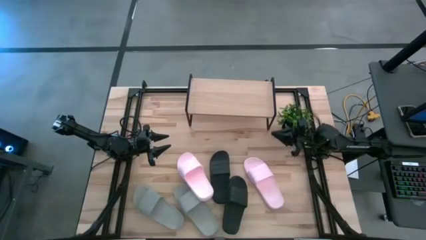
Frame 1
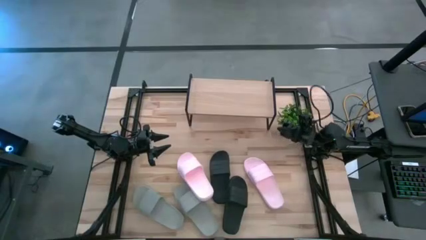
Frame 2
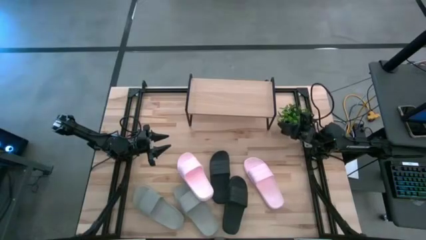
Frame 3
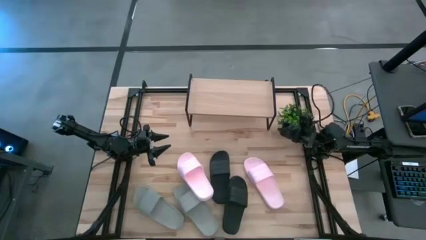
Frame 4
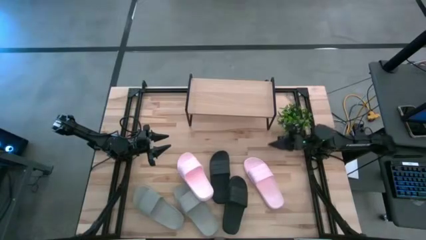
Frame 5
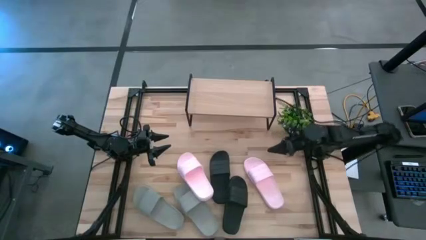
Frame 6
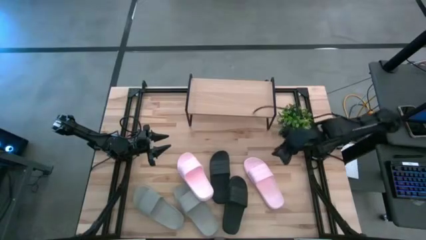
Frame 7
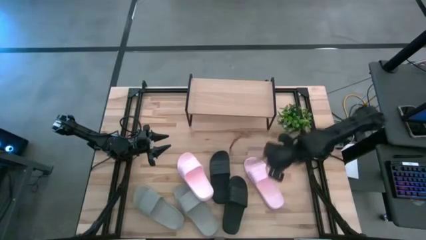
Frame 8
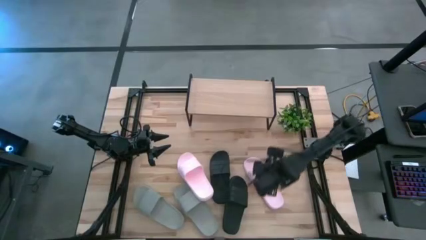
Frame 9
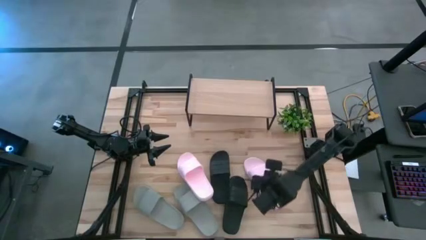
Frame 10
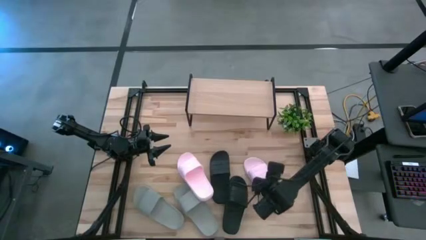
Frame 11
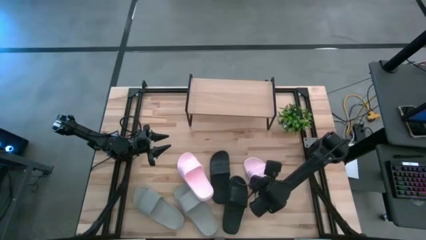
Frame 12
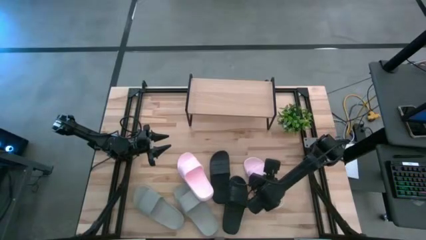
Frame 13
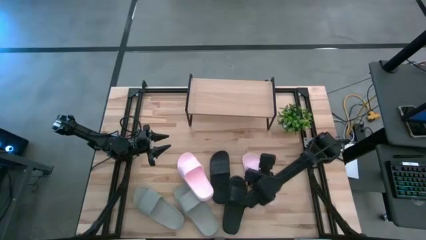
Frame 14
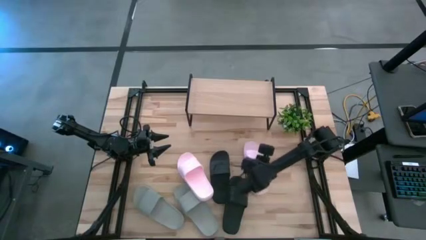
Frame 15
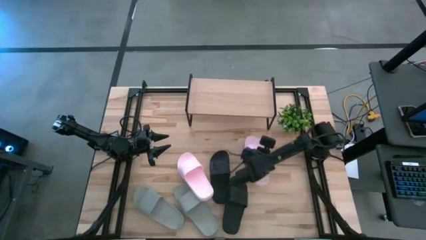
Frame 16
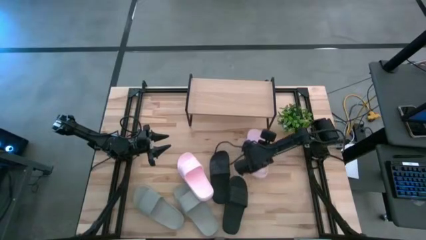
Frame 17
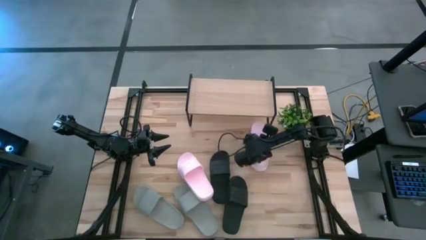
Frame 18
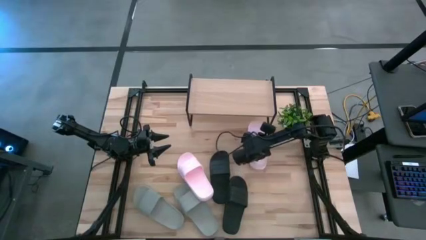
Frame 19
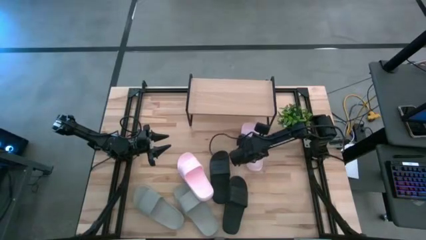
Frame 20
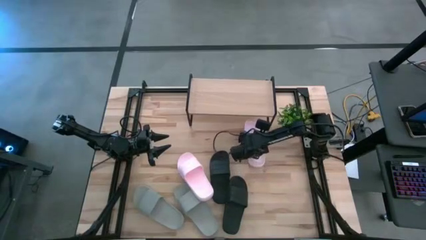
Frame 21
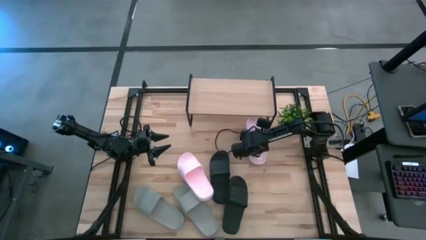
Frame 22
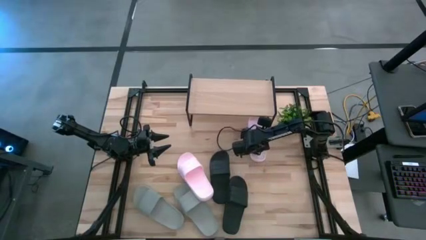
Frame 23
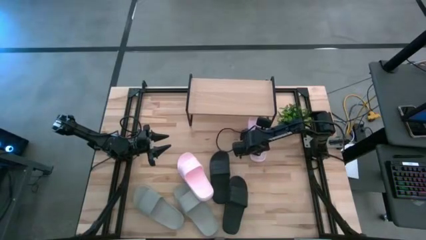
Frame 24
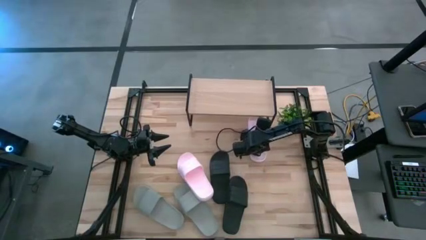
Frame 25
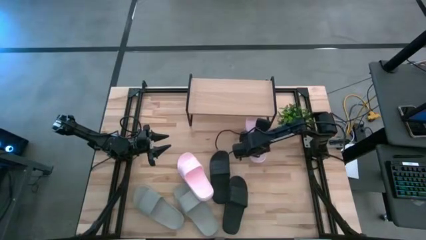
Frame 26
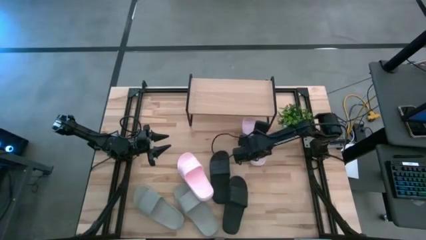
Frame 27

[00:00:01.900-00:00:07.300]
Task: Pick and place slides into the shelf
Put the right pink slipper under the shelf

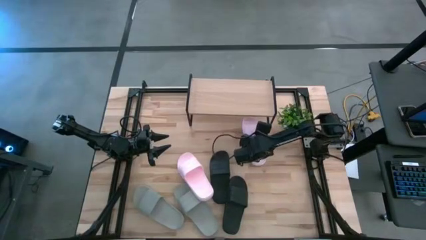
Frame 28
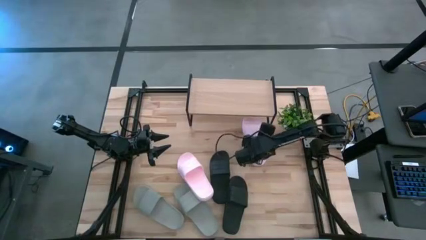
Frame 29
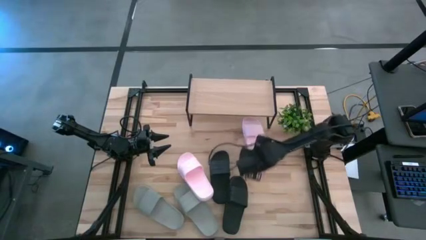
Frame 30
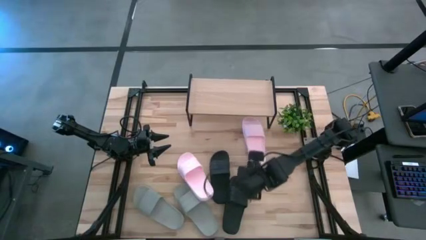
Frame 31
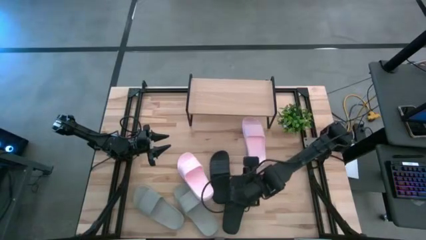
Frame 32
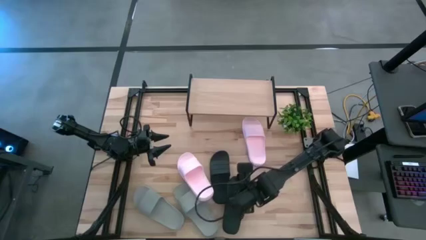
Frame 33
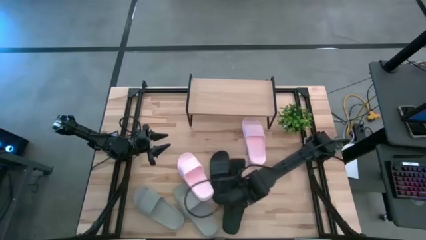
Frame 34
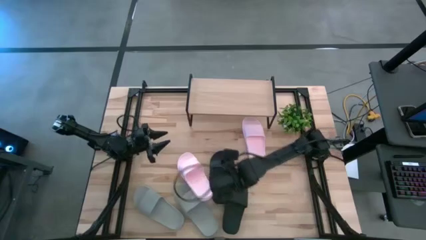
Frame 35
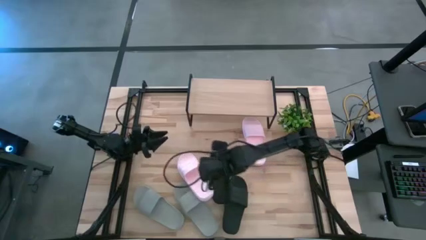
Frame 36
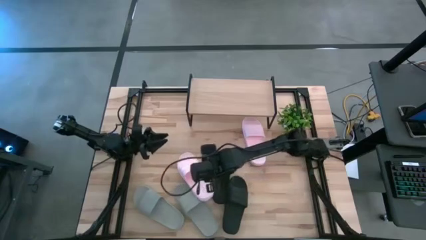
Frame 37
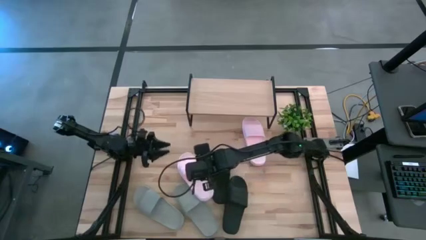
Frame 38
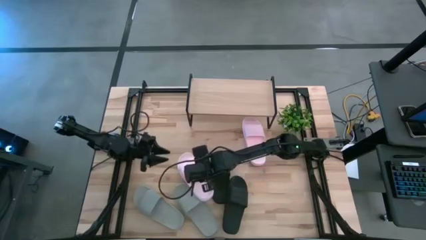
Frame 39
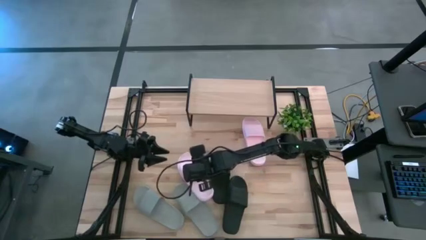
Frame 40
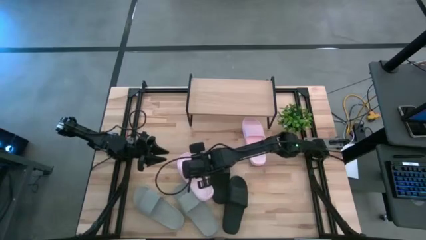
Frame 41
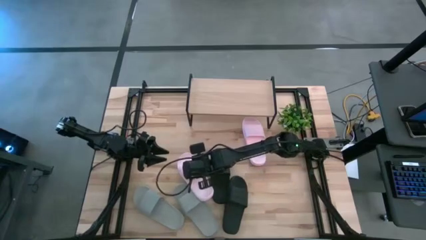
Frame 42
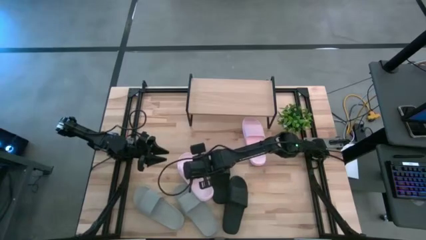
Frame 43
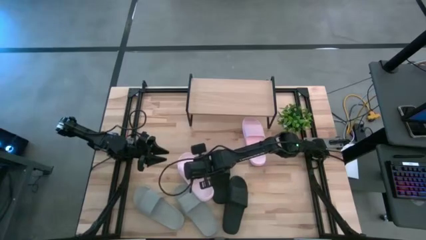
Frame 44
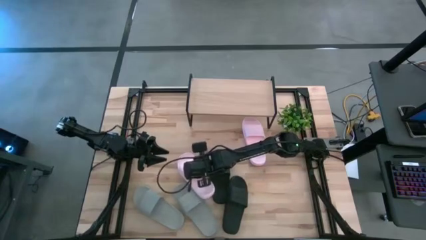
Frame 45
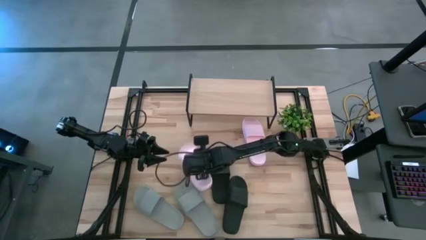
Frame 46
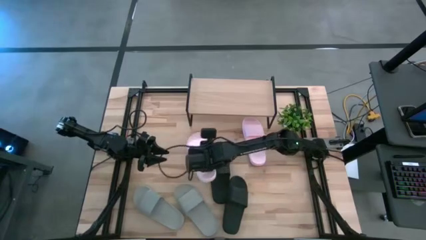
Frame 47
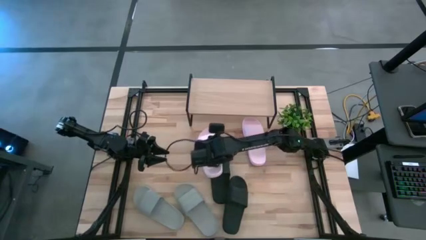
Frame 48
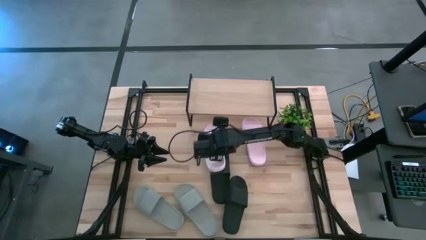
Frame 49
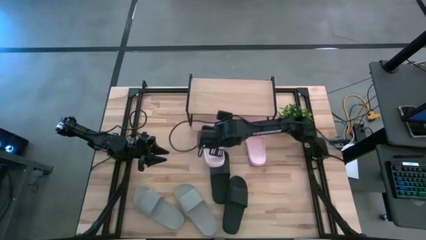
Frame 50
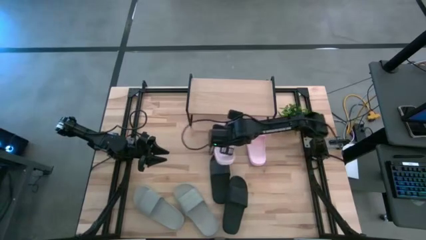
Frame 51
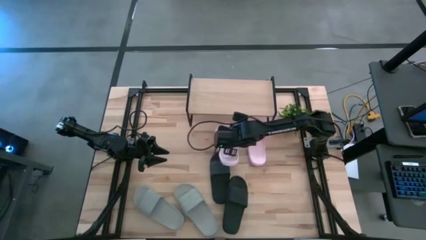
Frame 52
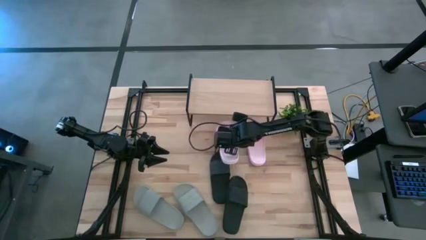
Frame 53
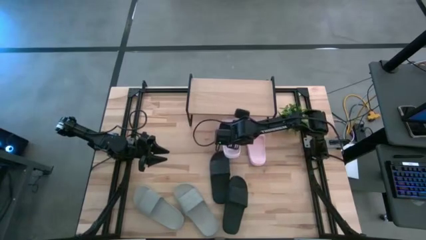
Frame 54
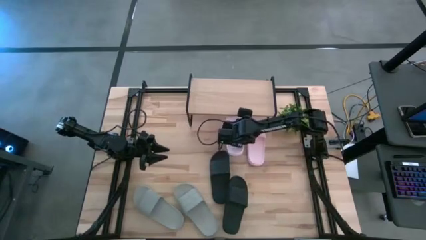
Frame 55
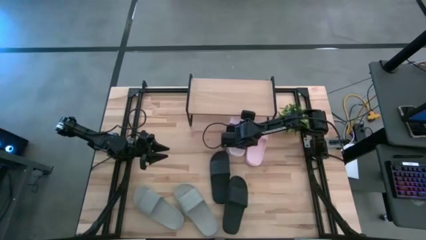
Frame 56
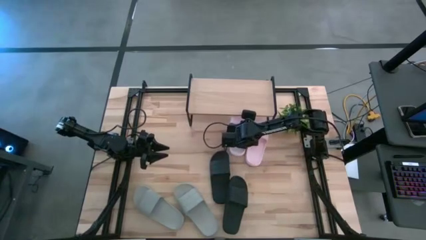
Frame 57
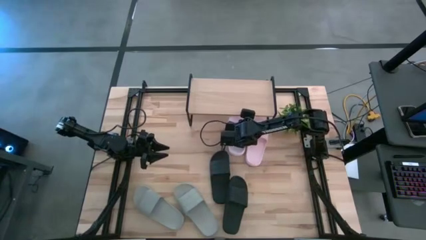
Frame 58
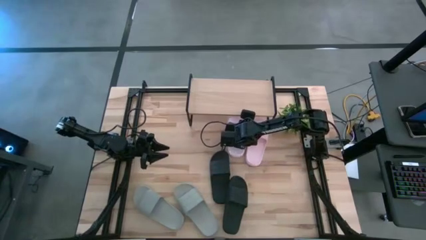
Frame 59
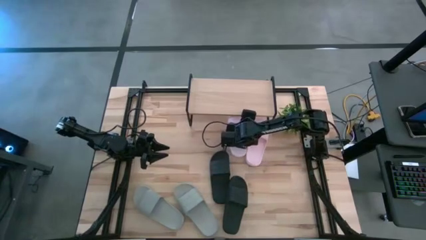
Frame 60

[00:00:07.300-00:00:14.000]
Put the pink slipper under the shelf

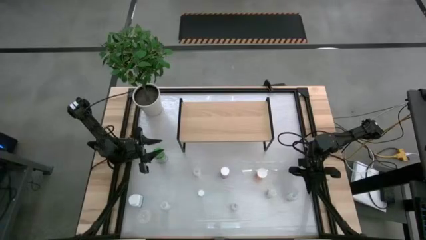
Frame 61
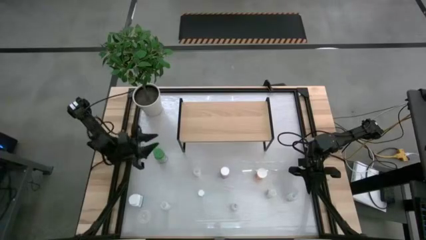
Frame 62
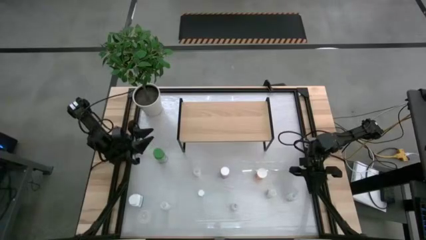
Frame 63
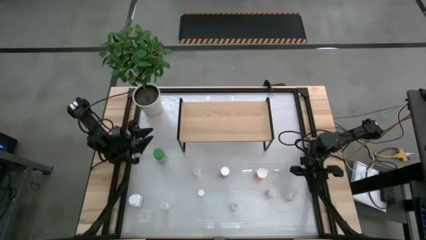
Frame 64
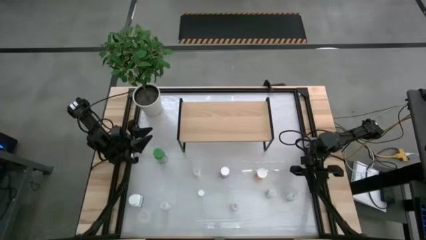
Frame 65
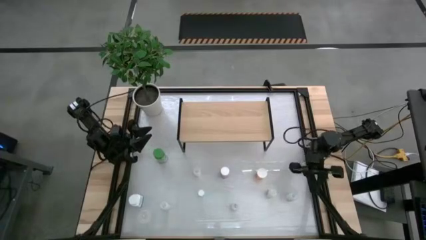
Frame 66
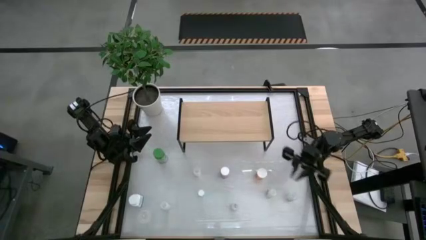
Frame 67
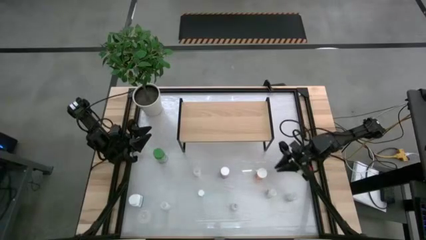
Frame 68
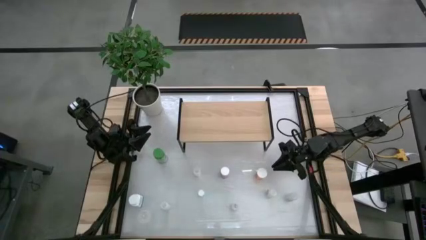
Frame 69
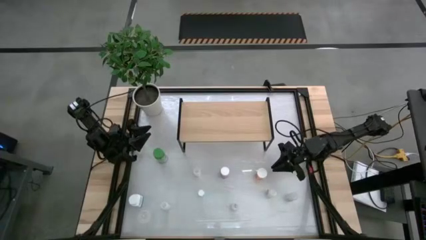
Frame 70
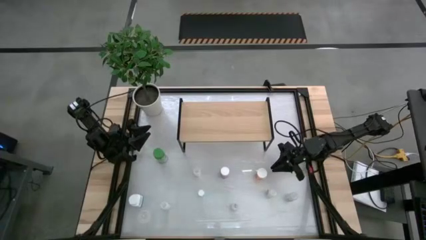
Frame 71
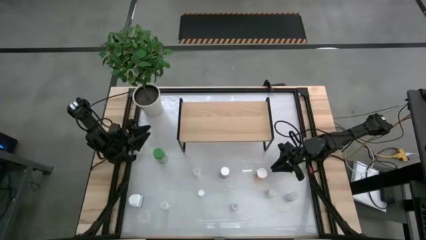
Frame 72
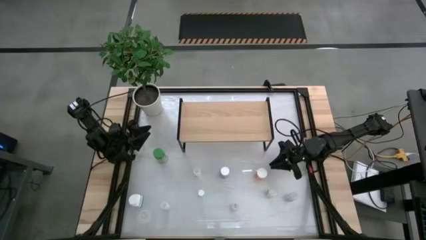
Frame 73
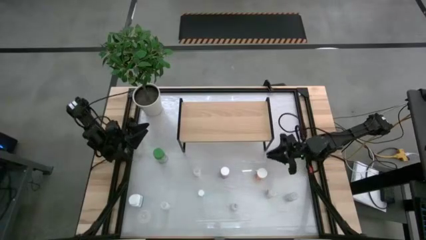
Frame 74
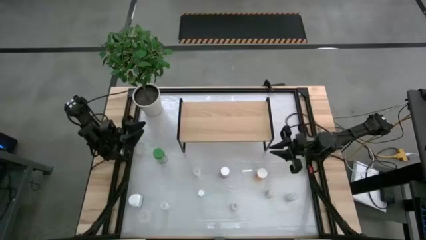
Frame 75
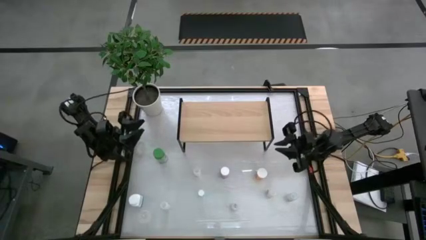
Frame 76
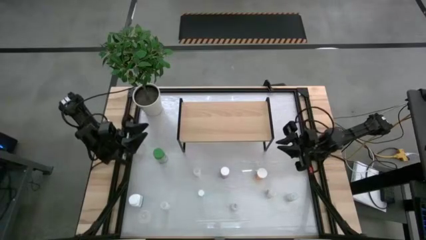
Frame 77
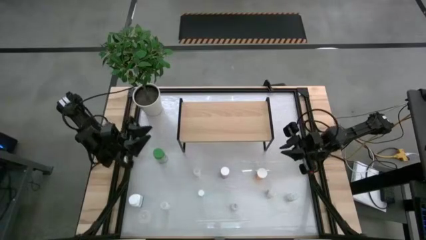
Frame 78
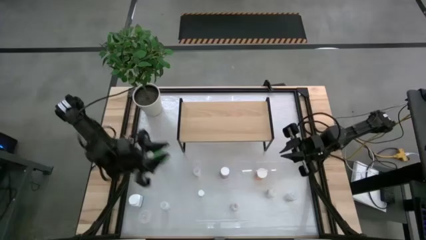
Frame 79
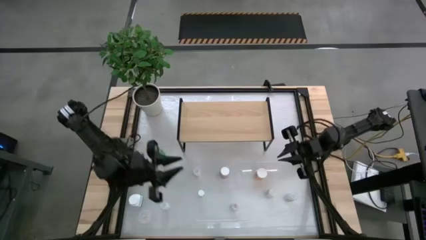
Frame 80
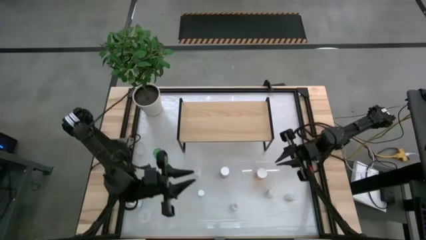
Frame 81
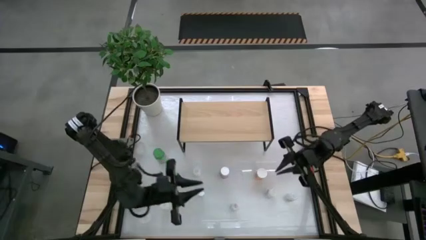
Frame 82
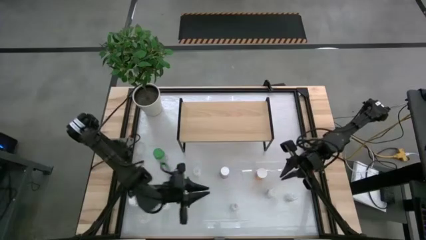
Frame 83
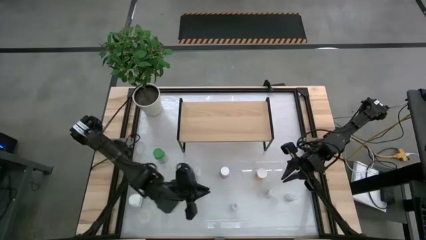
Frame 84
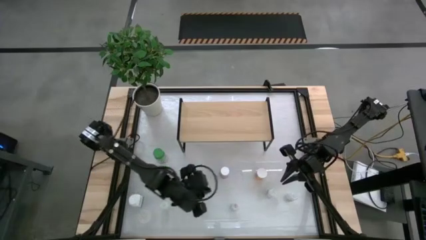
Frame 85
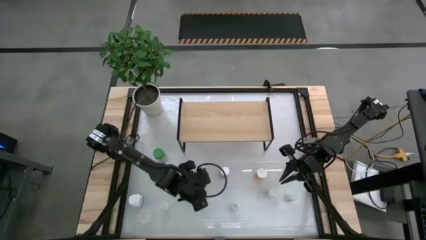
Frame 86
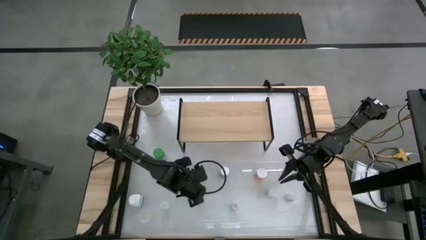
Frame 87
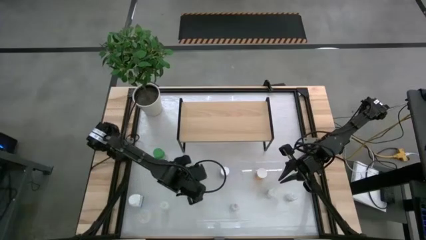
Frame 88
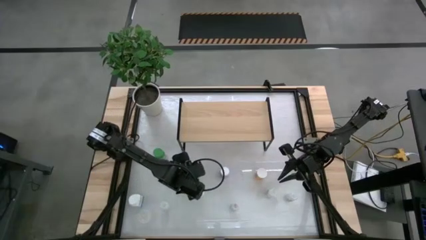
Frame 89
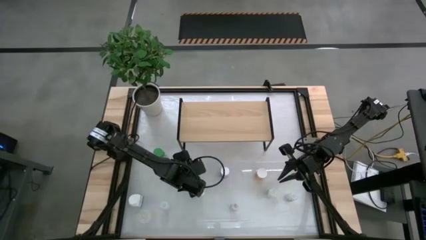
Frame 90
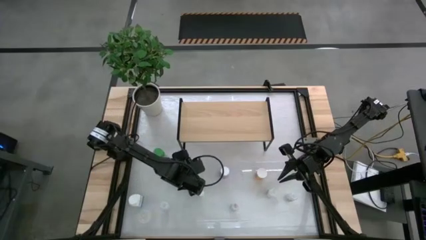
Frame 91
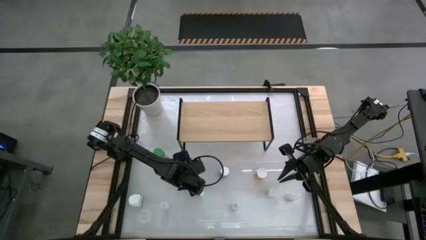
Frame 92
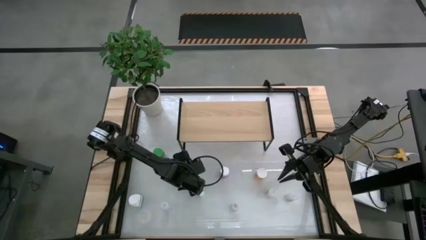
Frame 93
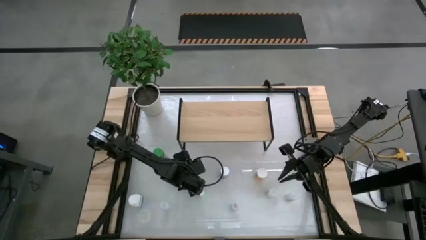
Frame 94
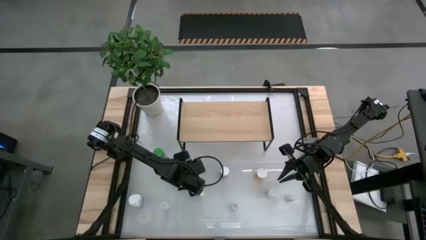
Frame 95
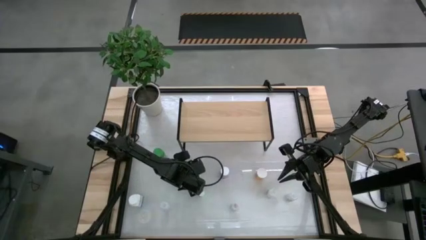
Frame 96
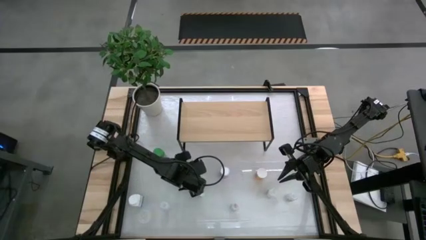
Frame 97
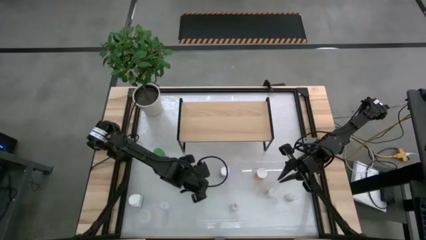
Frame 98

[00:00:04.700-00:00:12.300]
Task: Pick and place medicine bottles onto shelf by color
Put the transparent pill bottle on the shelf
